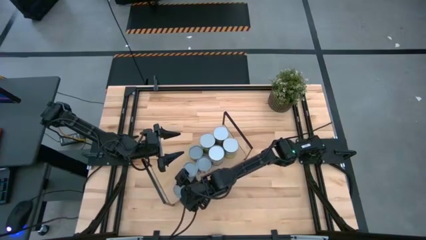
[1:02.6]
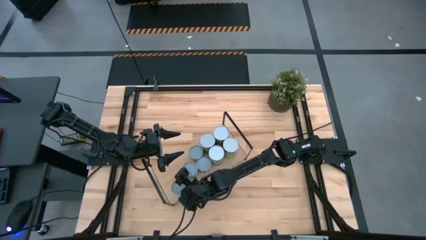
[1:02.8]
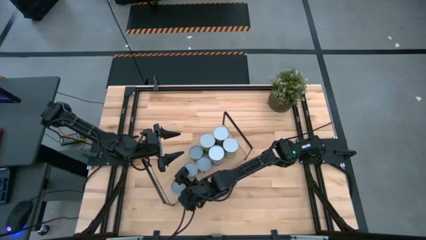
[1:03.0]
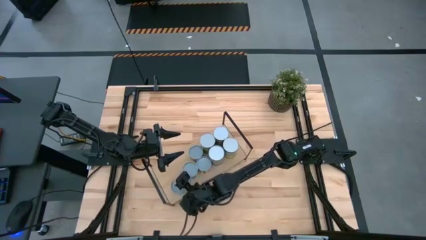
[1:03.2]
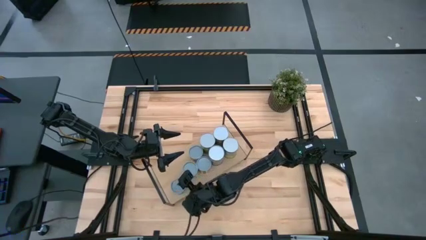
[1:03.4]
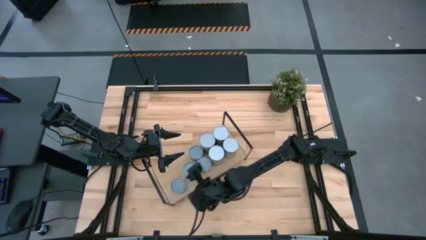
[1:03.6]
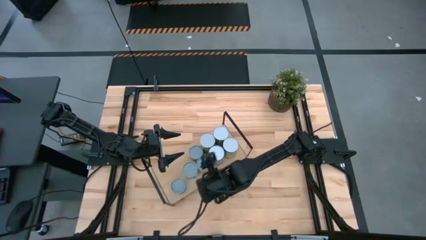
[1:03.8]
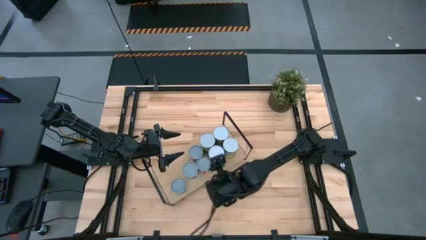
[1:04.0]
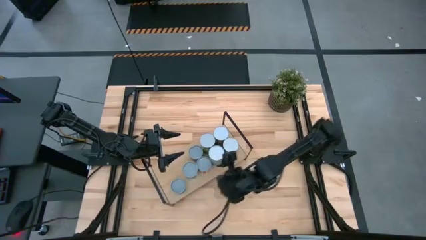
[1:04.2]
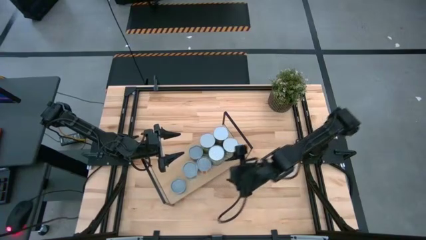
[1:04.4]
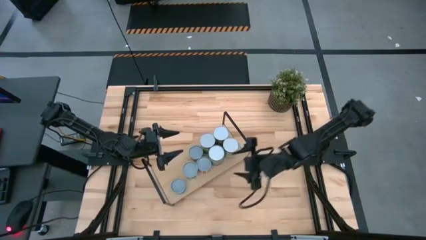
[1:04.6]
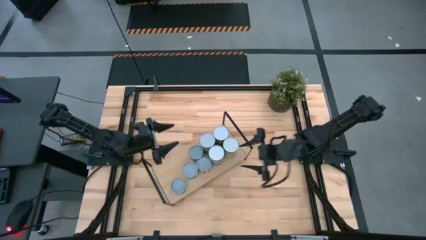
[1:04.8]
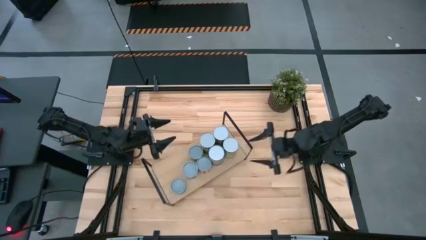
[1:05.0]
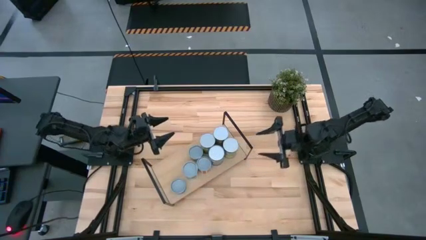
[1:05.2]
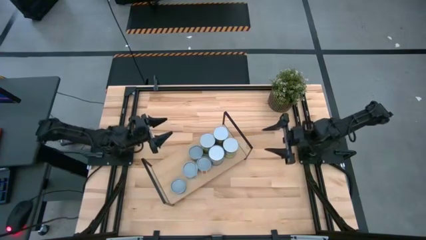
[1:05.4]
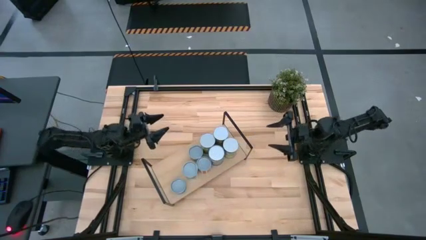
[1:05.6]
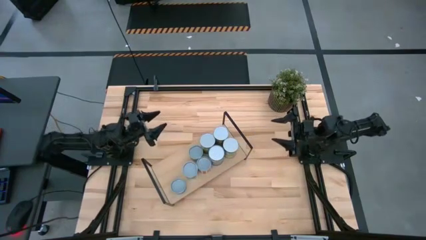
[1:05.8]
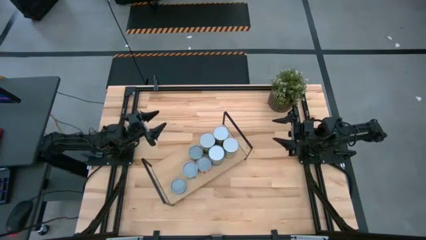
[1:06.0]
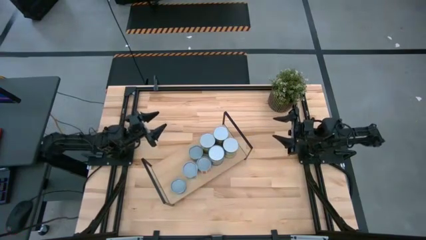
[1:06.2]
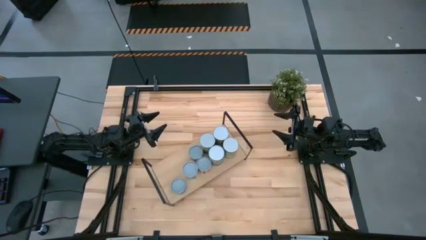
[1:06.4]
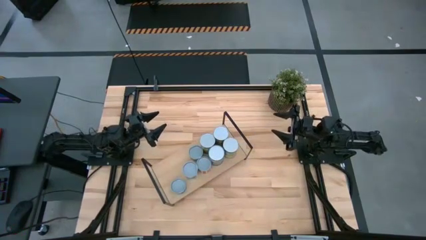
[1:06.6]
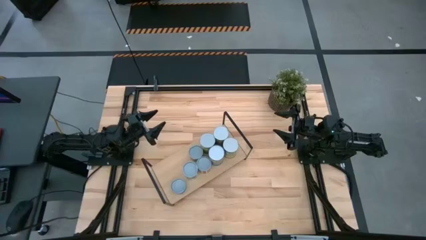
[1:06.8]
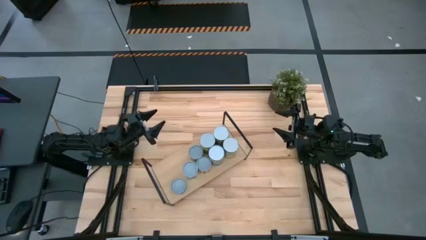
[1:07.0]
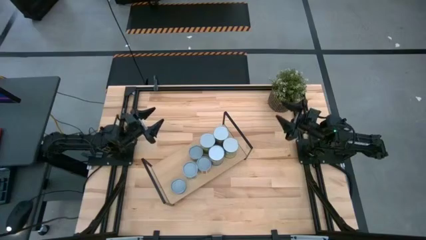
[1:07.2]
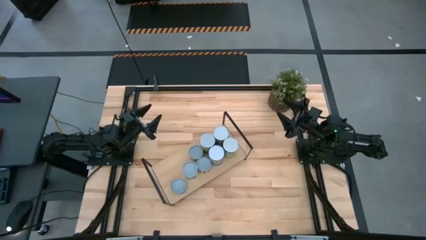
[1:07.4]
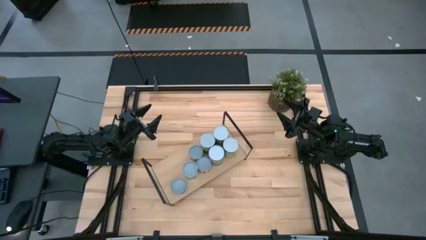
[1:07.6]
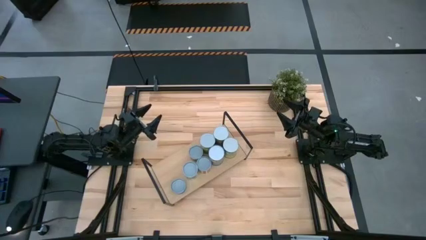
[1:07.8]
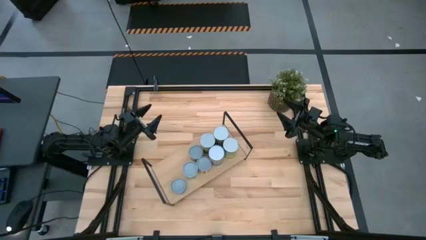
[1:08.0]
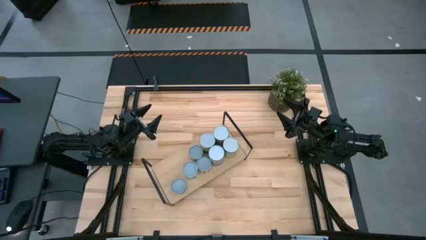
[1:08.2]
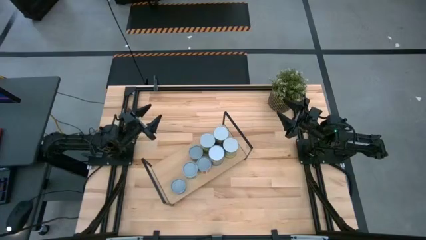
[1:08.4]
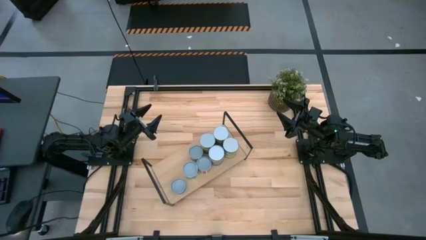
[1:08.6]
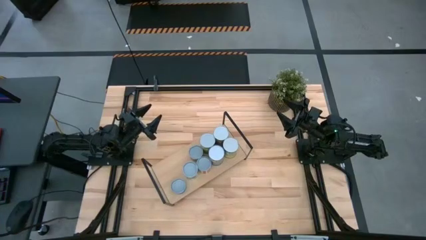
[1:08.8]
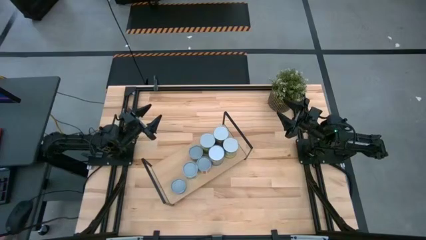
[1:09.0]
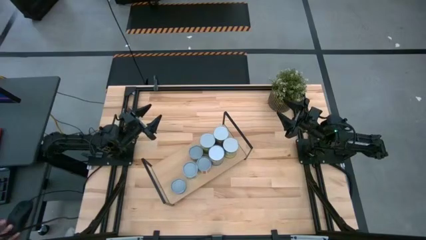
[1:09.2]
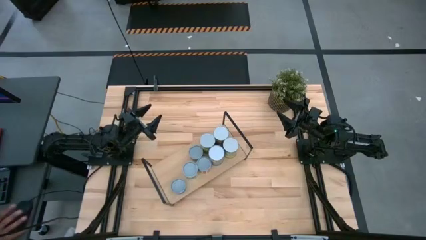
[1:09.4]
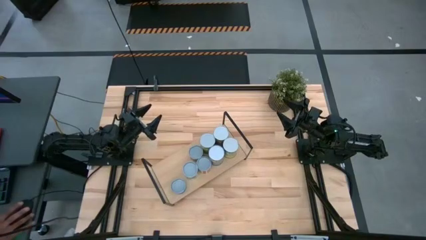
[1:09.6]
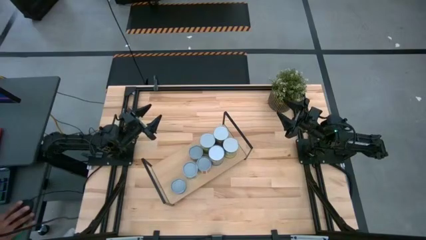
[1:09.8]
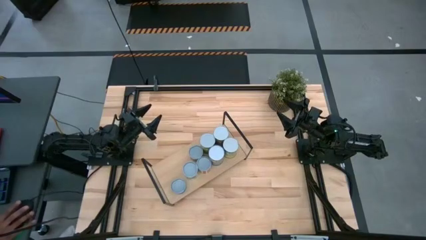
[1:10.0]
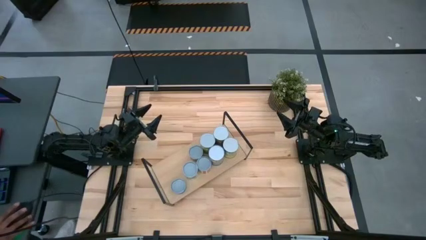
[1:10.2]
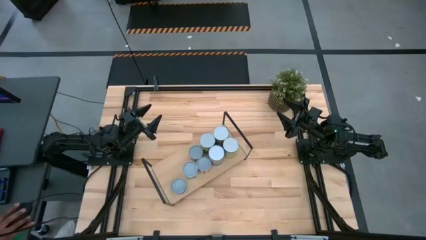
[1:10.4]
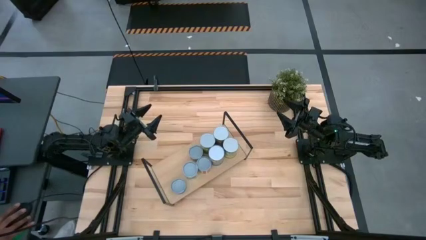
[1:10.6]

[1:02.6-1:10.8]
Task: Pick and place cans onto a shelf
Return to Home Position

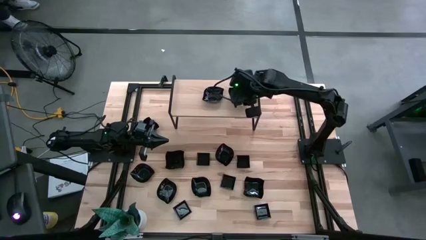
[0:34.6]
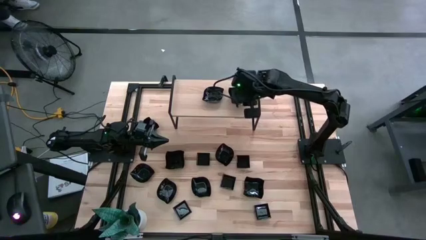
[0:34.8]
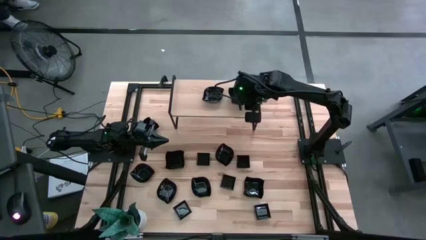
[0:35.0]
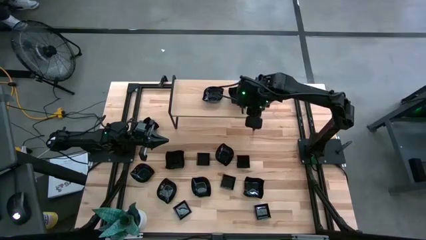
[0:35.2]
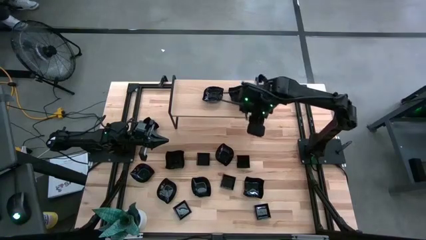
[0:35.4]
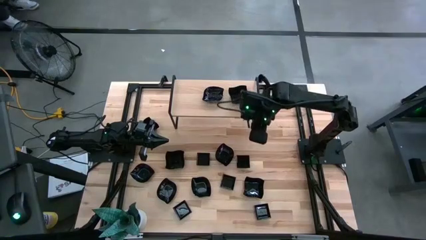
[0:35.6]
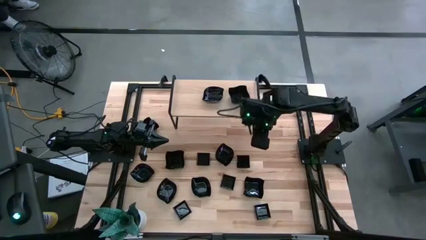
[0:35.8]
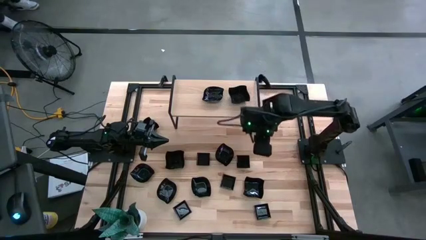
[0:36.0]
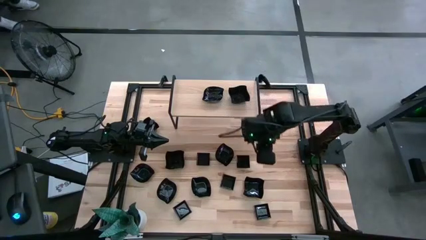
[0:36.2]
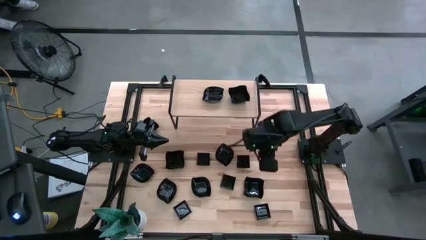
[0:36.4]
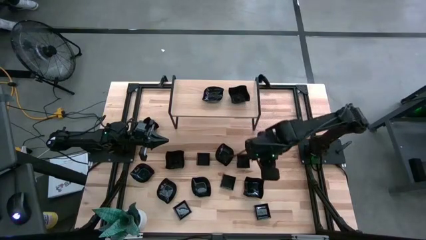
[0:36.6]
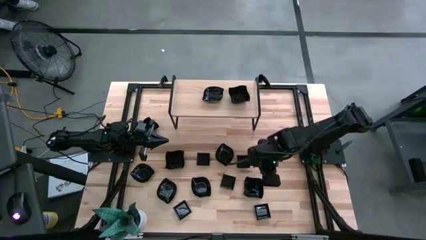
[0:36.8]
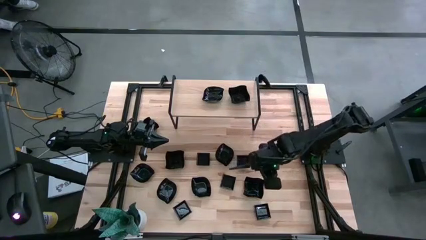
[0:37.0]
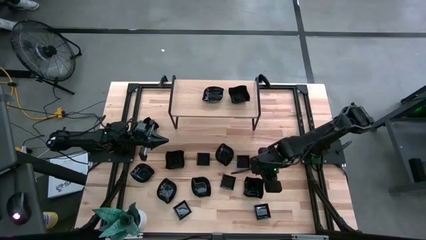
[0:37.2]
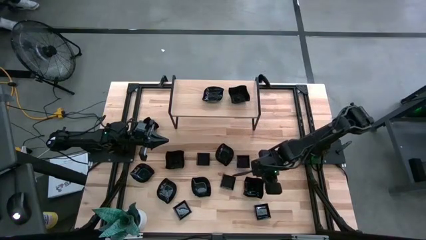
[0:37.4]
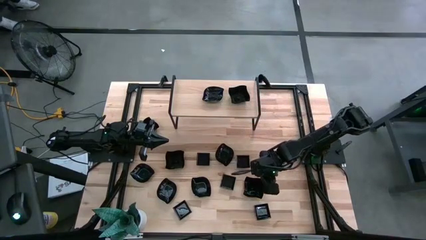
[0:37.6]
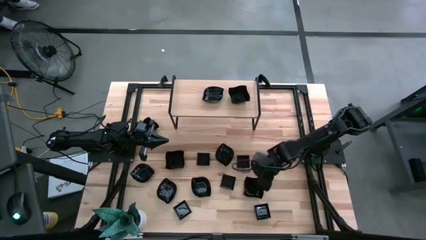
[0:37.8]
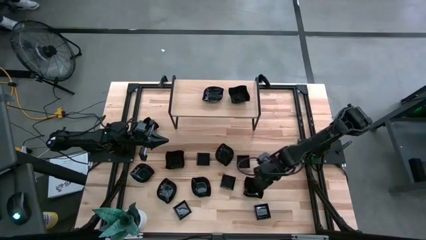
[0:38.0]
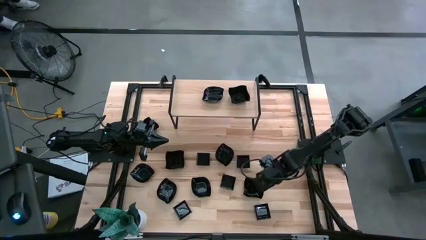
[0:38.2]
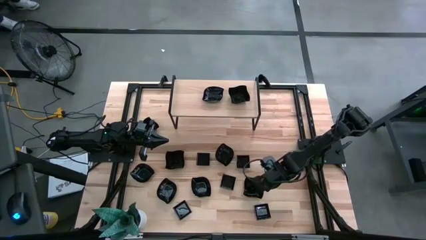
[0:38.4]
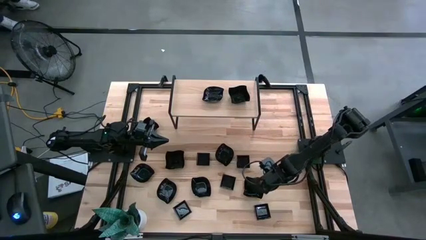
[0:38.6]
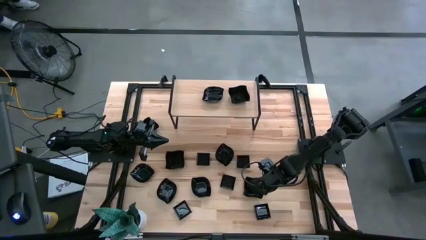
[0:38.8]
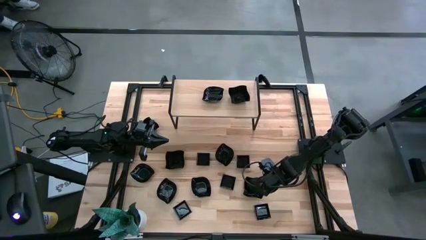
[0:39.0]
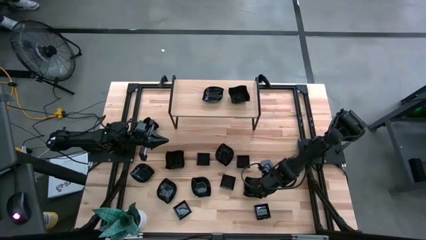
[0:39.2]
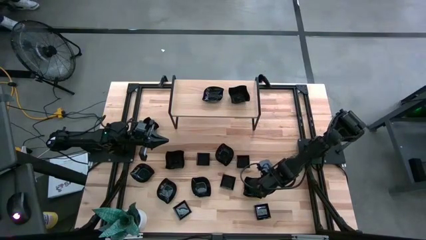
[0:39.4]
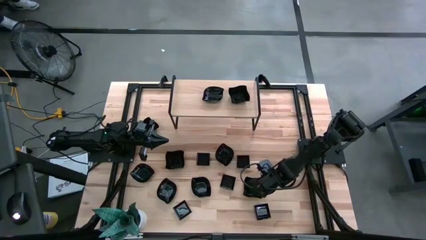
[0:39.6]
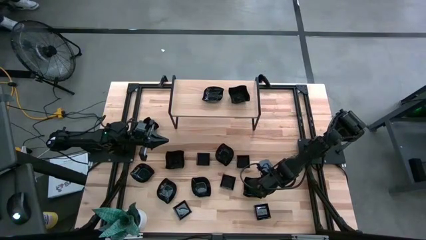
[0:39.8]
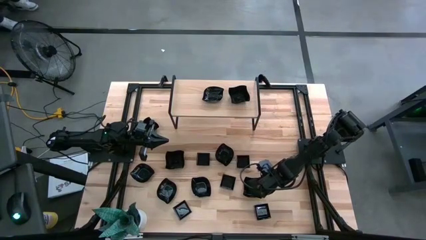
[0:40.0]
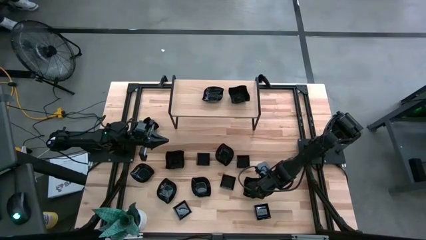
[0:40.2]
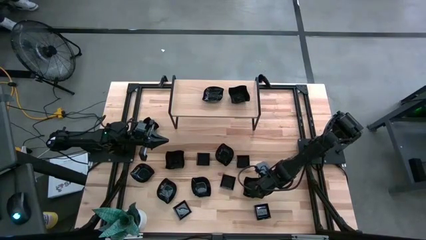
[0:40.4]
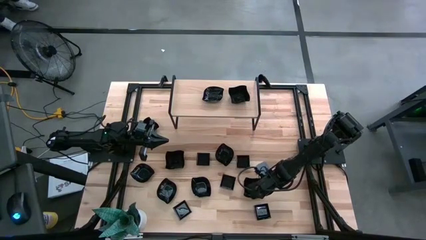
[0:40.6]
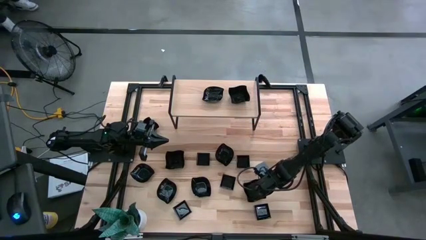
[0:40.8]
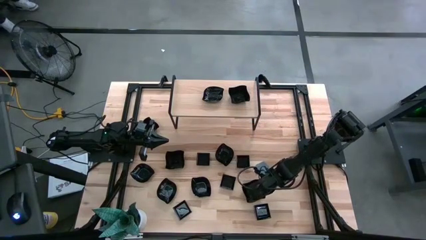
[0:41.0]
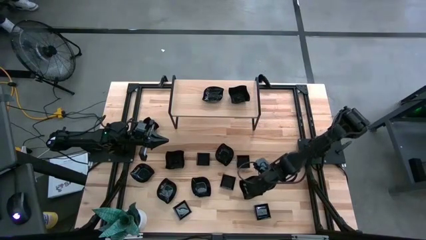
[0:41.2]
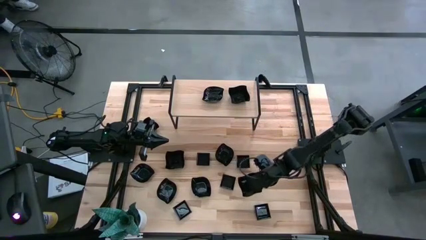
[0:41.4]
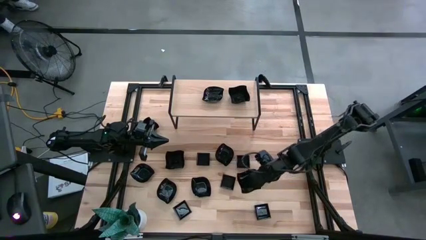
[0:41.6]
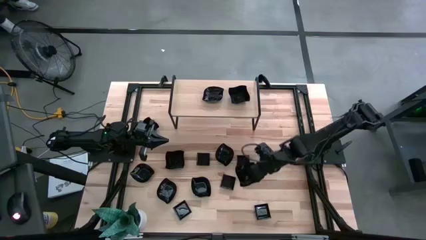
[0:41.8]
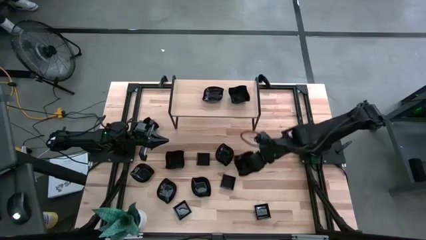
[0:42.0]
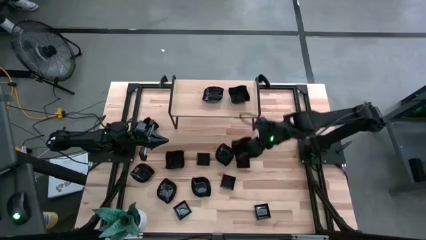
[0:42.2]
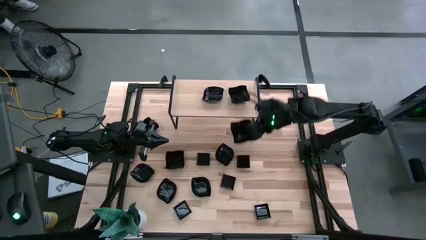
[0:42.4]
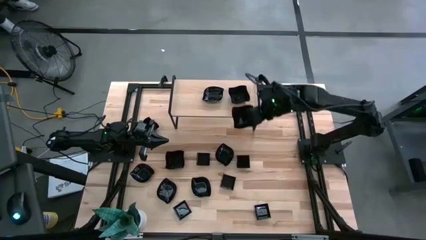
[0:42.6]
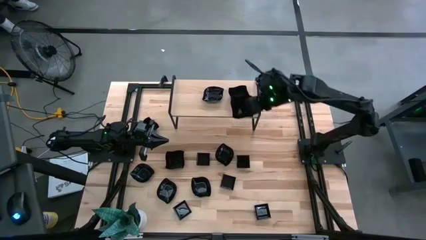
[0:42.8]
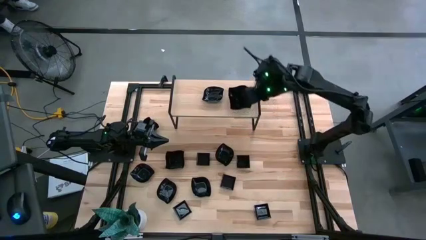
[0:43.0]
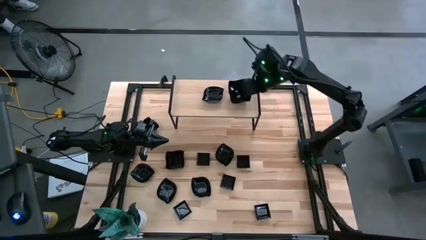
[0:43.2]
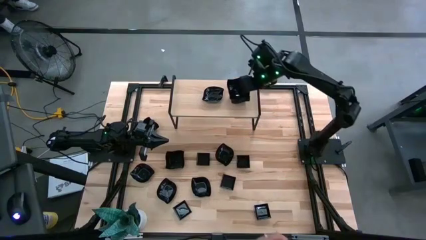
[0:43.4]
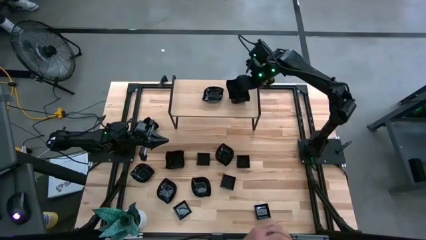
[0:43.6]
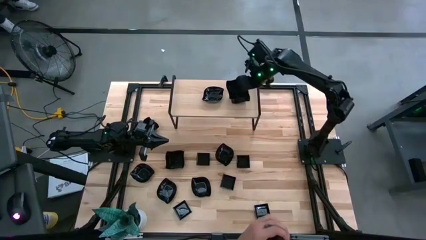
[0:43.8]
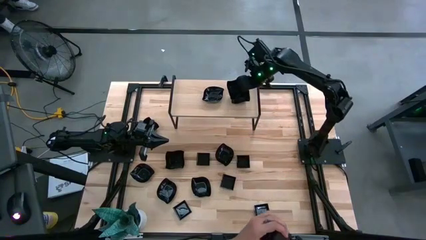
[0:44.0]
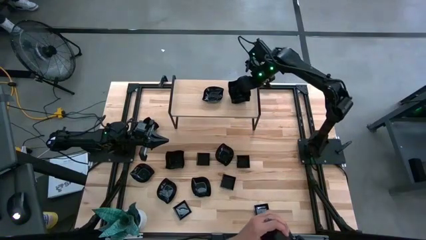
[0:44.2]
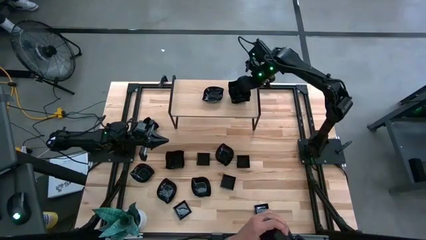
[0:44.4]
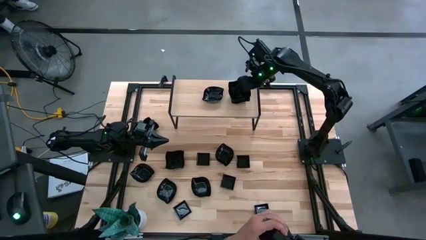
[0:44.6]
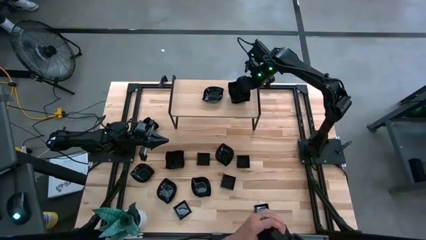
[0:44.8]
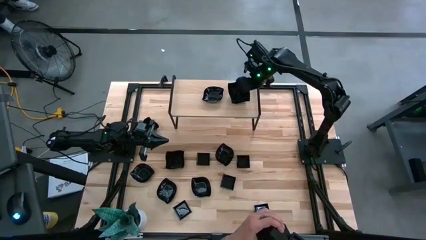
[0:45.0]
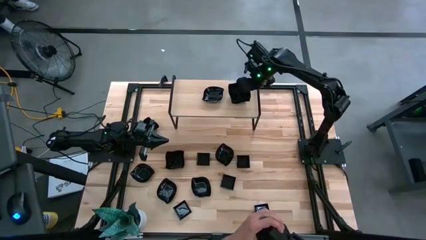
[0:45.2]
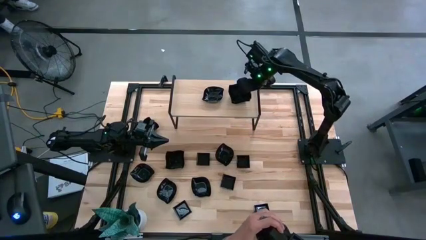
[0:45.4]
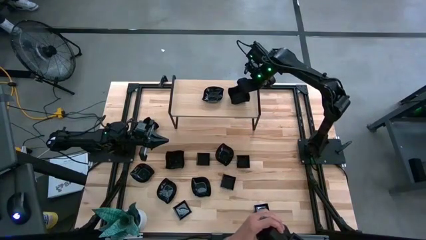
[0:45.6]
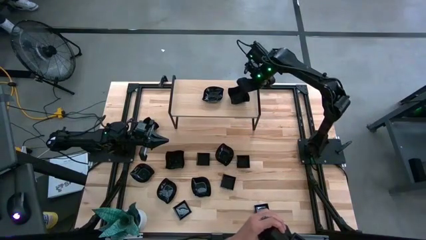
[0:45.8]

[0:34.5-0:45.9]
Task: Pick & Place Mini shaped plates
Stack the distorted square-shaped plate on the distorted square-shaped plate
